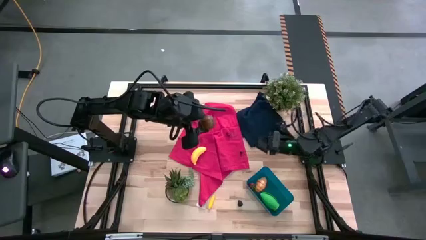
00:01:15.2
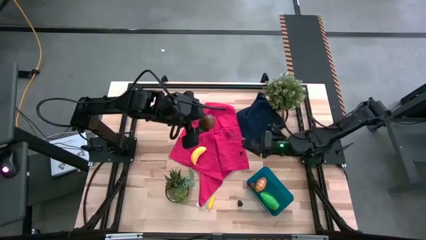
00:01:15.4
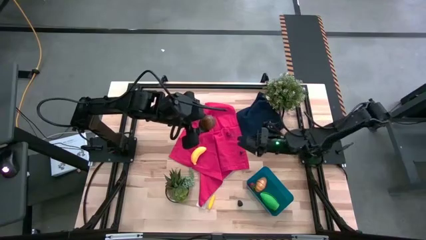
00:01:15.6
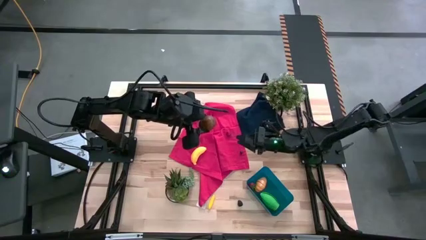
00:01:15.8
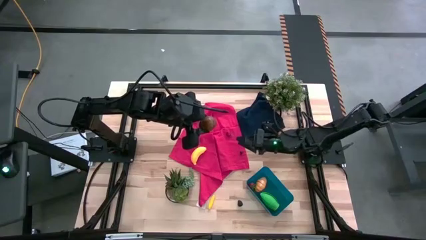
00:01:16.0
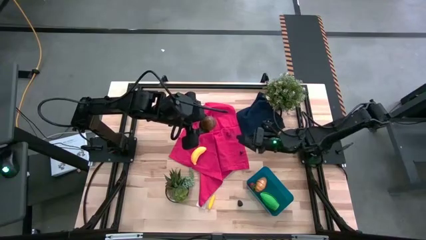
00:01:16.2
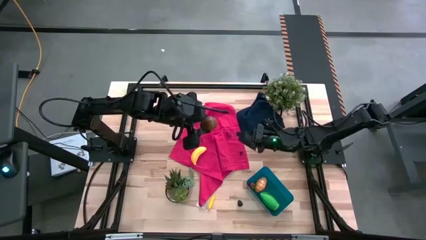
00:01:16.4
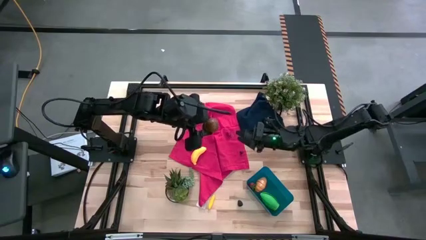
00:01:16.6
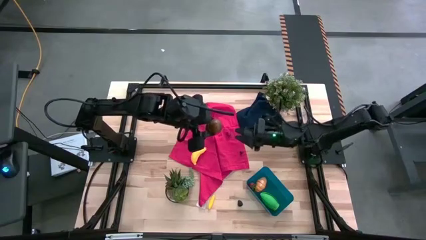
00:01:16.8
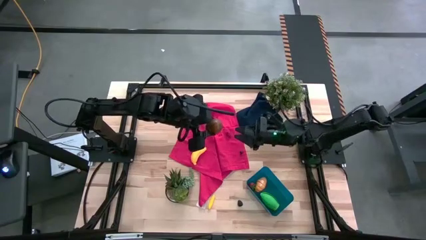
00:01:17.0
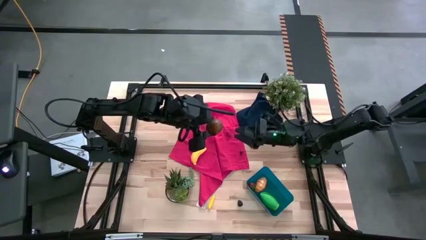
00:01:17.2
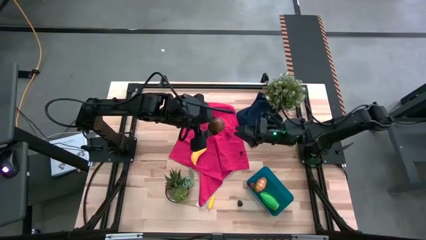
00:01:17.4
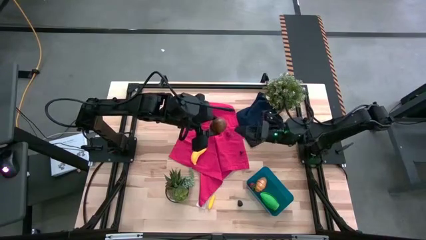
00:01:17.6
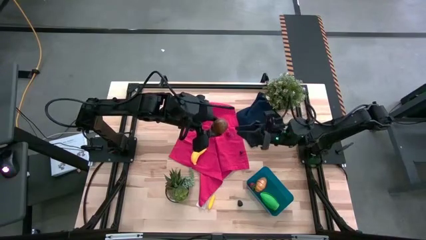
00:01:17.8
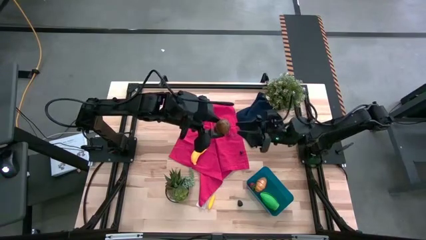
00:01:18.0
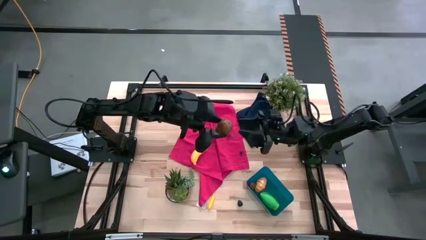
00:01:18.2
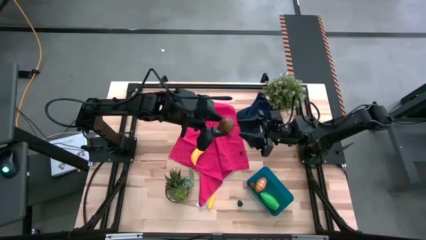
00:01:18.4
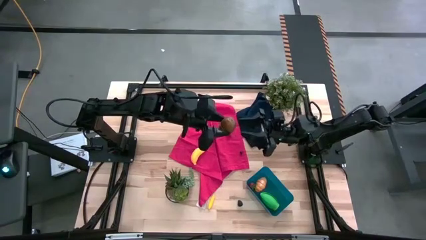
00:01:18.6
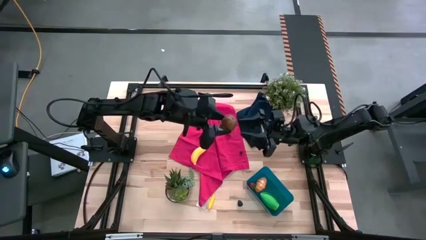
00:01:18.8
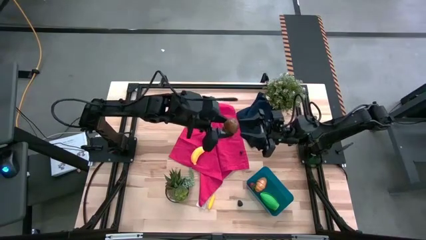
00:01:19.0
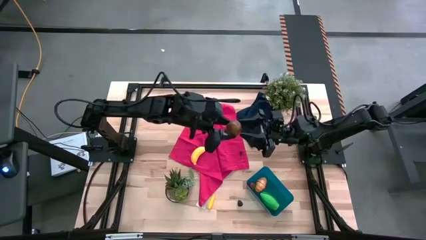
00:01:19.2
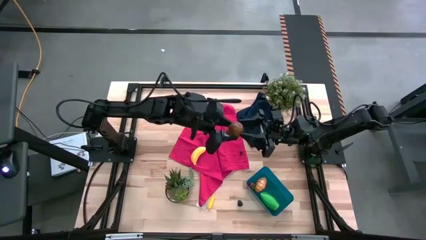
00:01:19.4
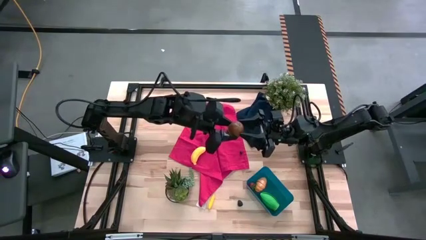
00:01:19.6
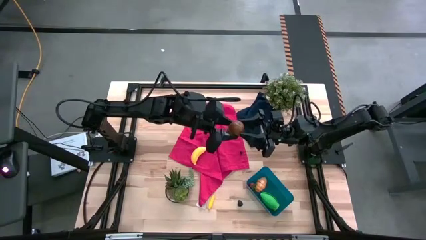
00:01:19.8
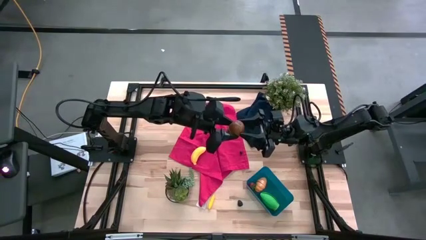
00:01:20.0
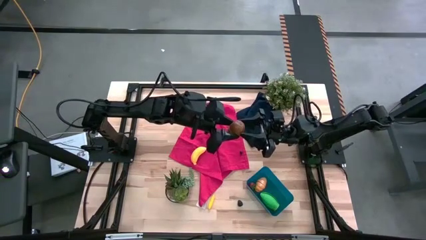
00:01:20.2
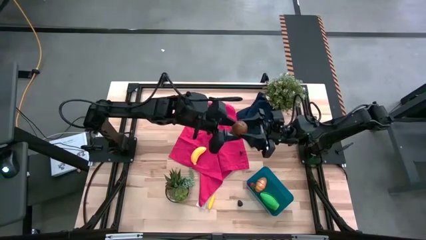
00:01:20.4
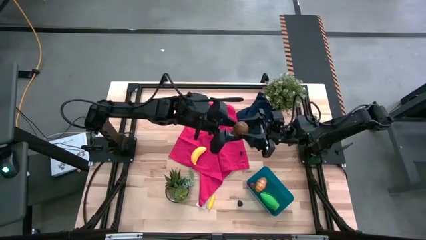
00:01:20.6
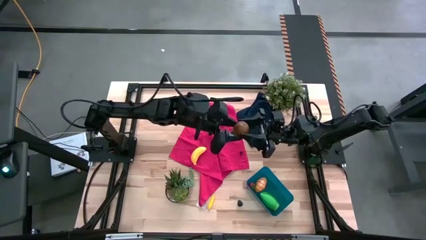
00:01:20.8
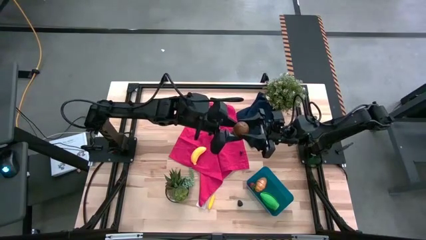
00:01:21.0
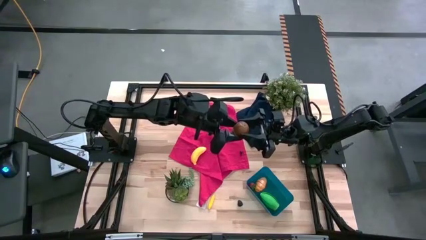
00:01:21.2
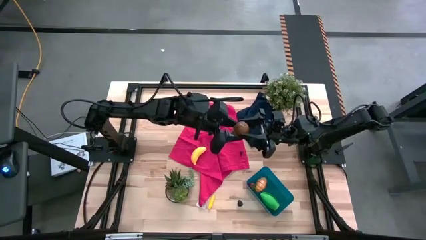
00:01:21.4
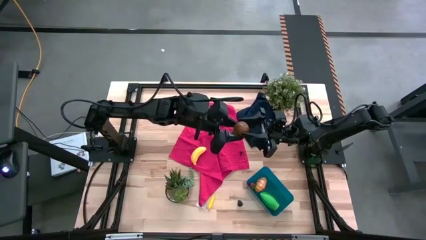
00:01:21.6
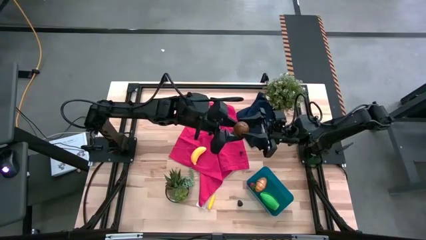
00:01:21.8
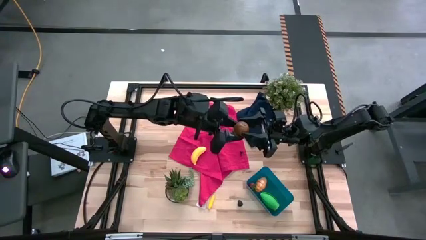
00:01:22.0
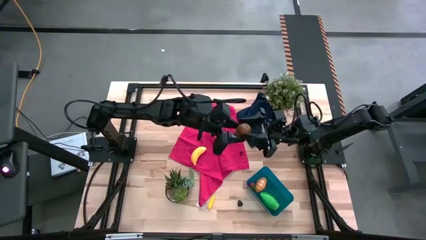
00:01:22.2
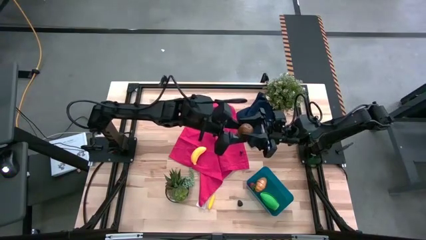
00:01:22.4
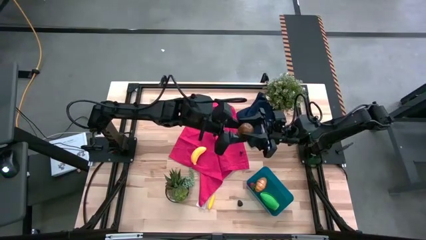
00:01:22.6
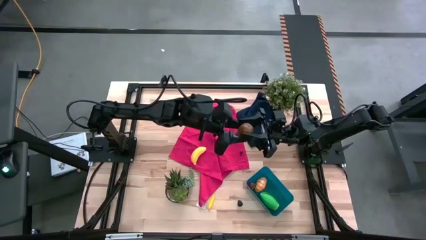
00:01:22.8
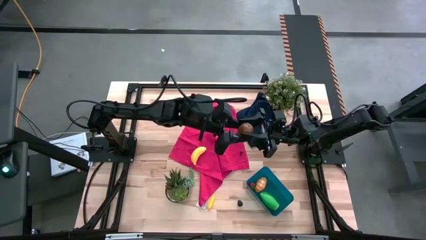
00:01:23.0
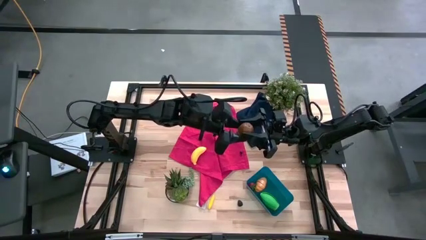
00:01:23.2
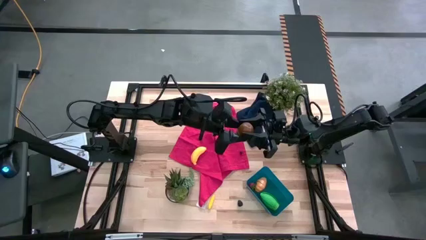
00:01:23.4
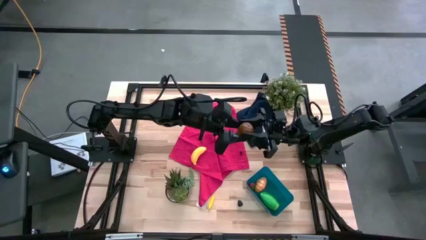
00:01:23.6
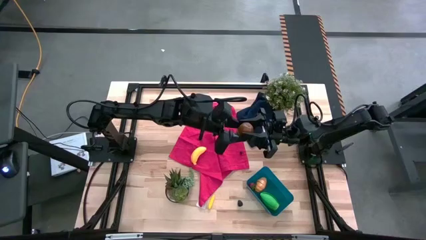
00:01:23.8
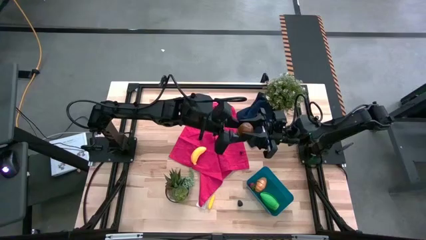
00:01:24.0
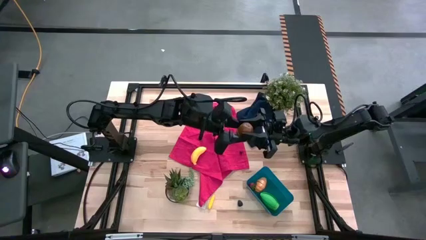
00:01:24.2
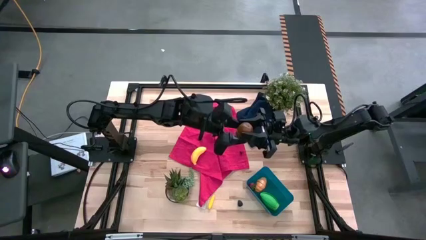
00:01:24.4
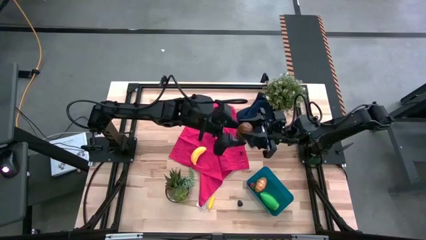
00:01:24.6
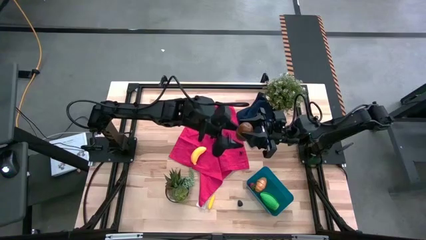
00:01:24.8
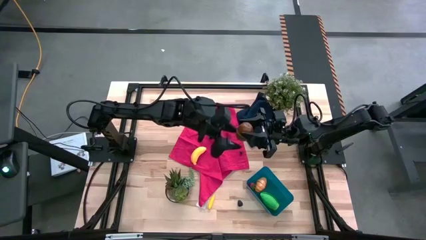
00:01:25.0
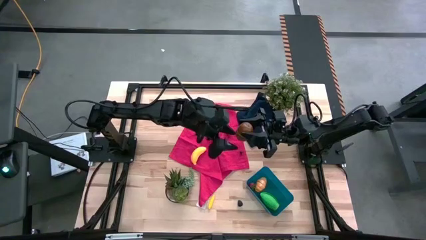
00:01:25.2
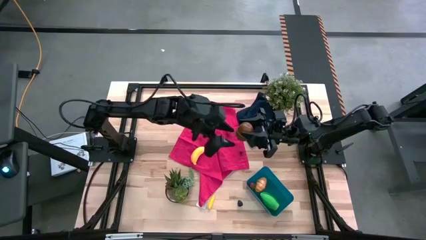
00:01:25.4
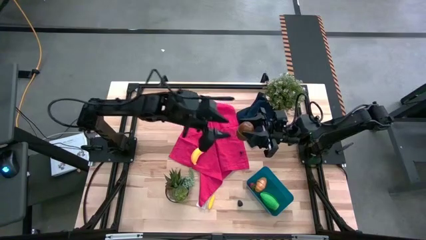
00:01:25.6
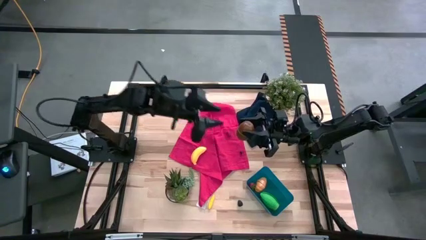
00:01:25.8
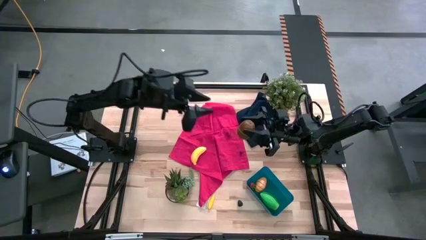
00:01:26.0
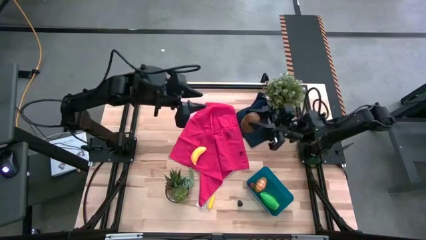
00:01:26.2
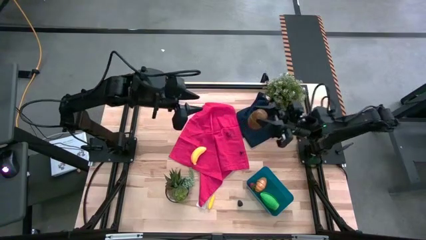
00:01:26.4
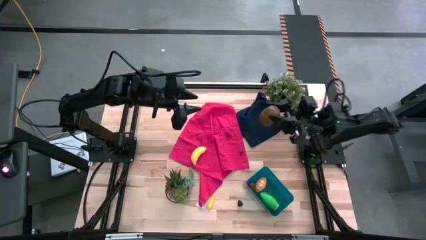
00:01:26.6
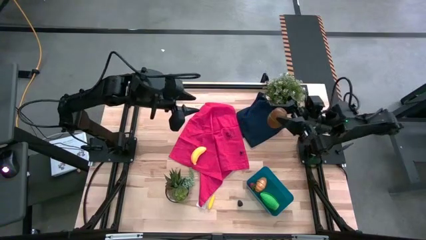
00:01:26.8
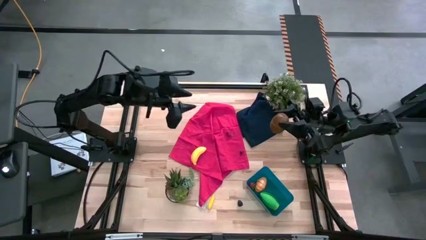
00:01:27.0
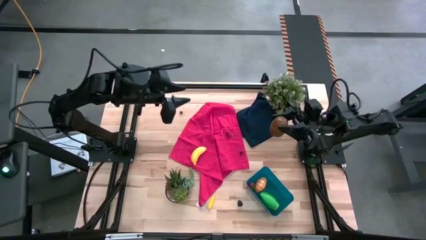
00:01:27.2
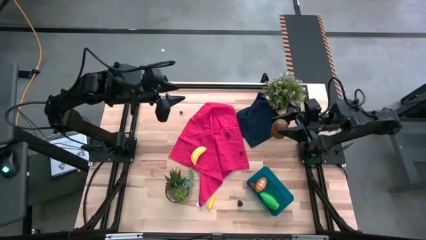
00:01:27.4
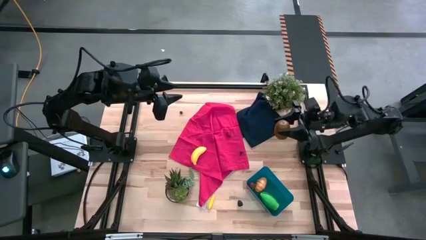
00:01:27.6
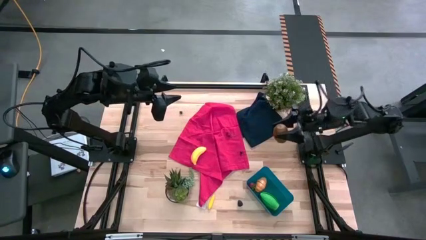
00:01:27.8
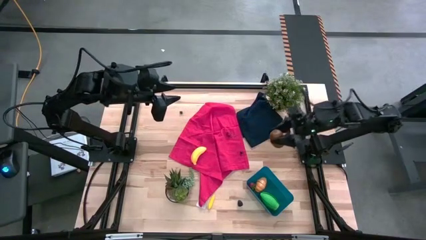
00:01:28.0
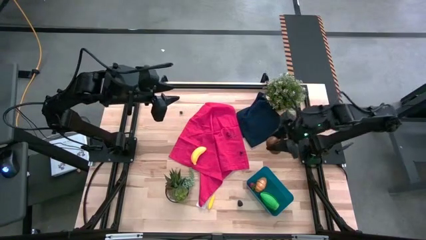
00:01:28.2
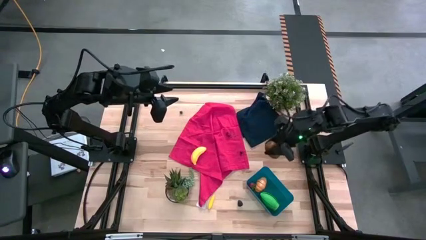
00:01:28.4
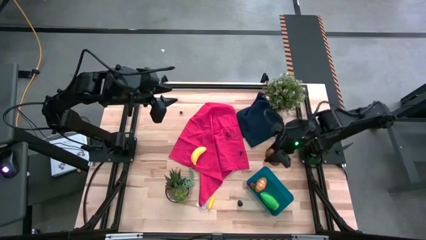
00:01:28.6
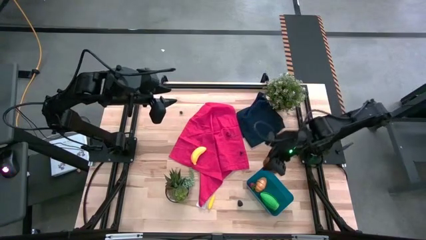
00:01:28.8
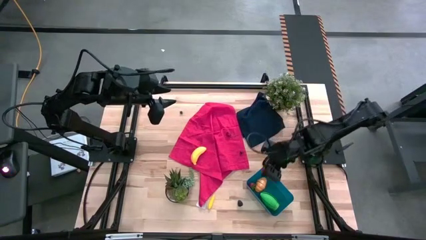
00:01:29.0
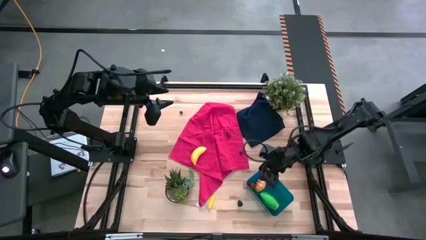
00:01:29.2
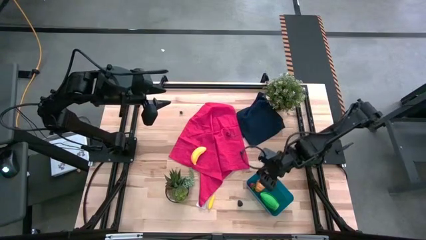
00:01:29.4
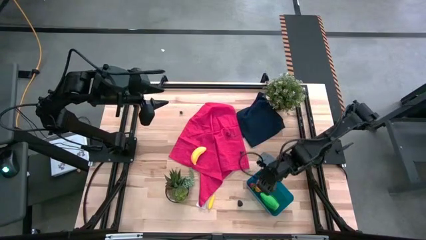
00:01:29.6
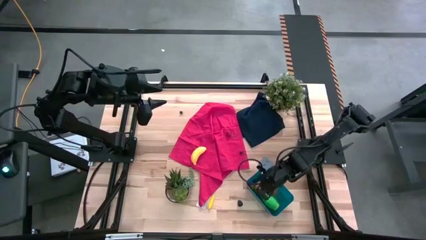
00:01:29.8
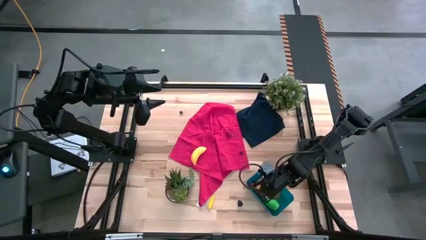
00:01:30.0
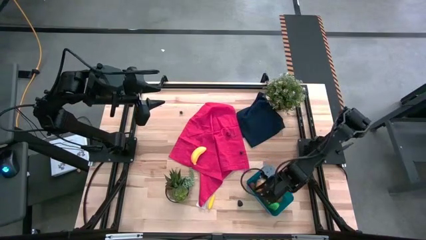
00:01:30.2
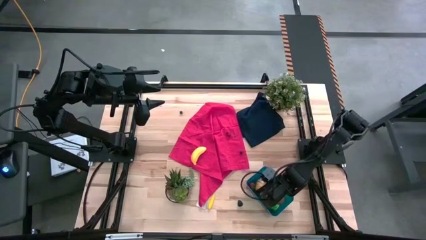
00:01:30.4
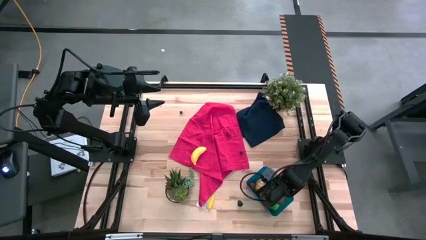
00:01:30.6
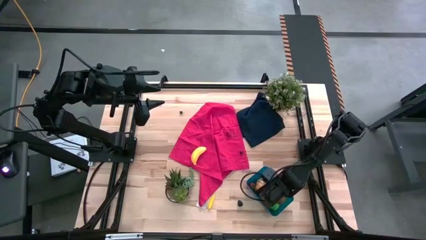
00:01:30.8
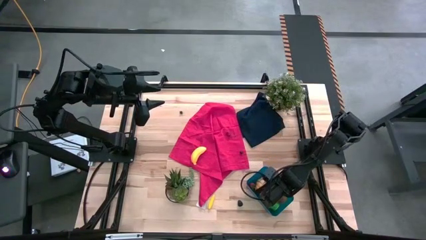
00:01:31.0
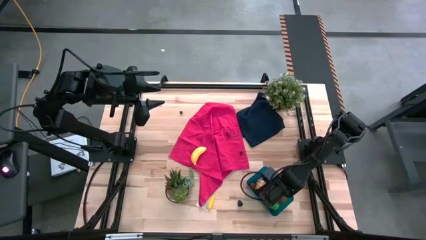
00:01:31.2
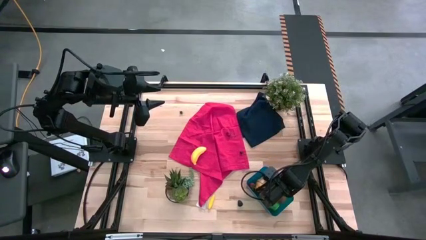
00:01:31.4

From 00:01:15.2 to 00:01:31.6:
Task: Pick and placing Produce into tupperware
Put the kiwi into the blue bin
